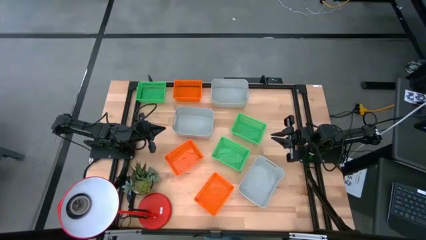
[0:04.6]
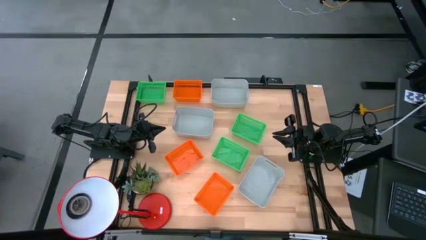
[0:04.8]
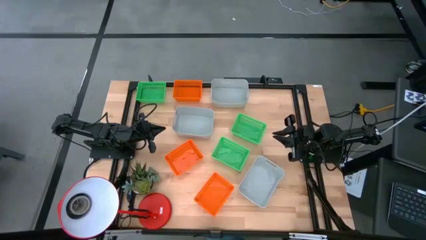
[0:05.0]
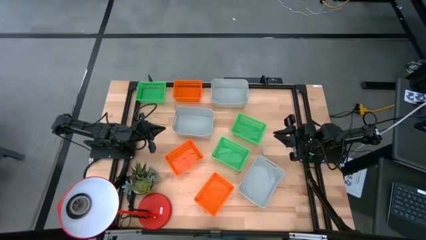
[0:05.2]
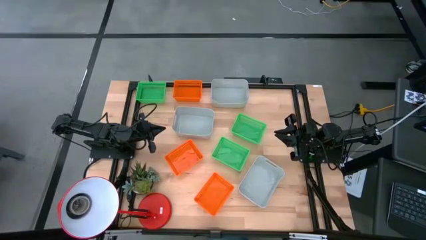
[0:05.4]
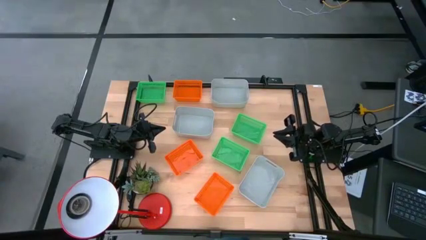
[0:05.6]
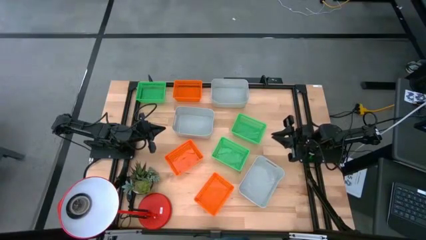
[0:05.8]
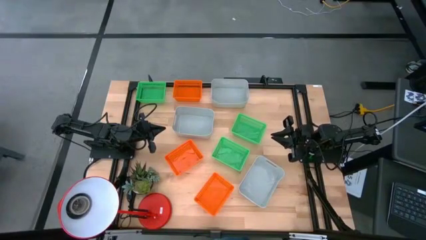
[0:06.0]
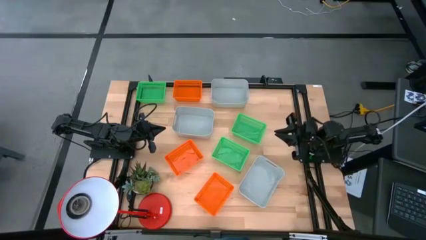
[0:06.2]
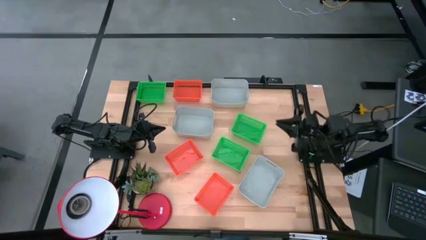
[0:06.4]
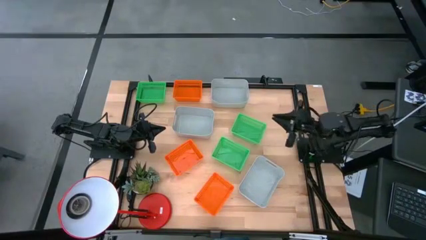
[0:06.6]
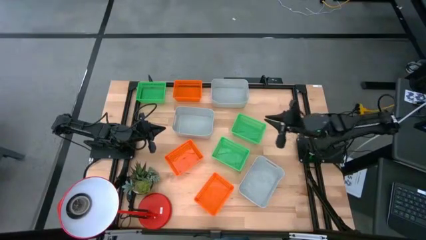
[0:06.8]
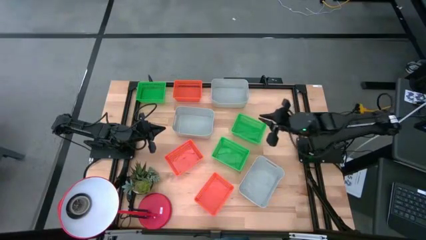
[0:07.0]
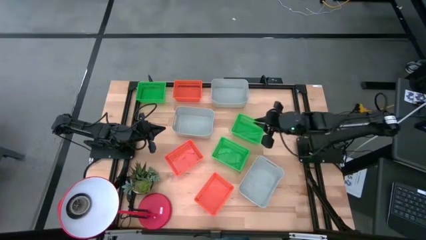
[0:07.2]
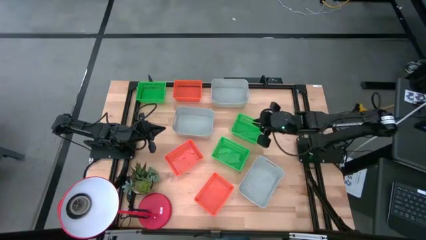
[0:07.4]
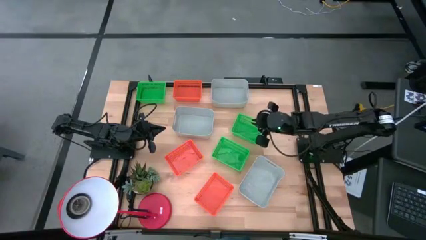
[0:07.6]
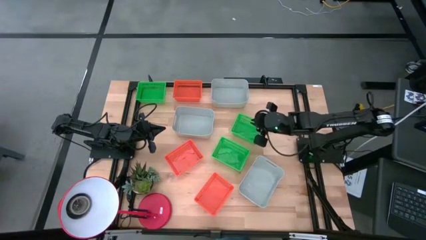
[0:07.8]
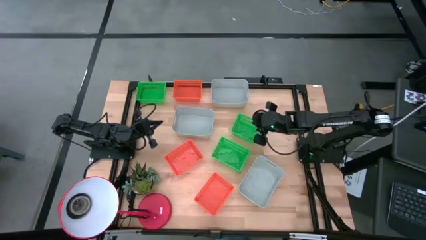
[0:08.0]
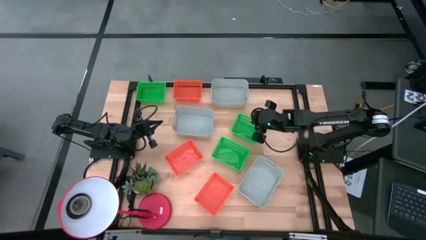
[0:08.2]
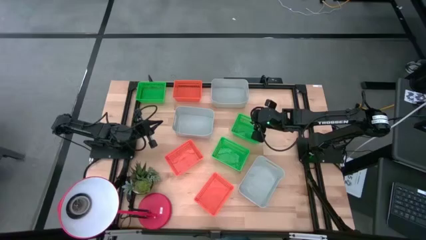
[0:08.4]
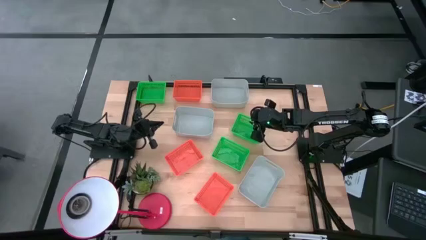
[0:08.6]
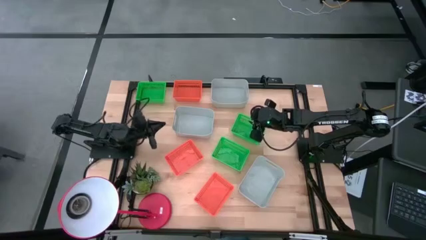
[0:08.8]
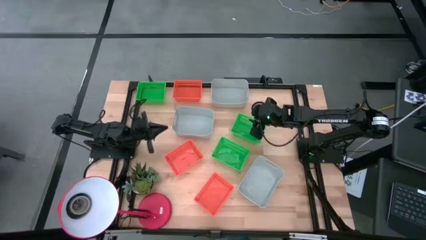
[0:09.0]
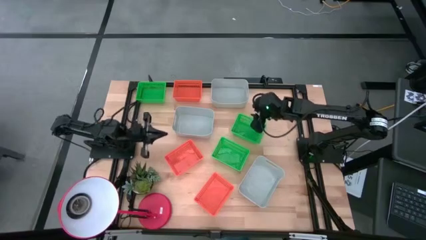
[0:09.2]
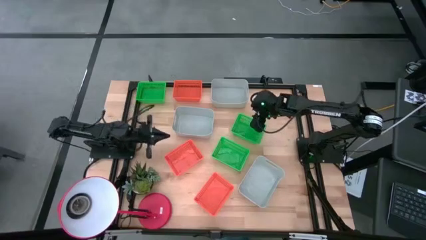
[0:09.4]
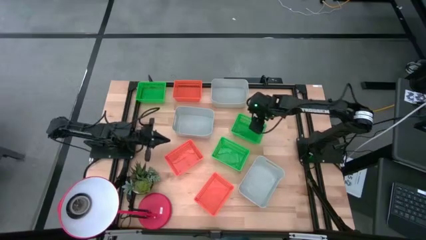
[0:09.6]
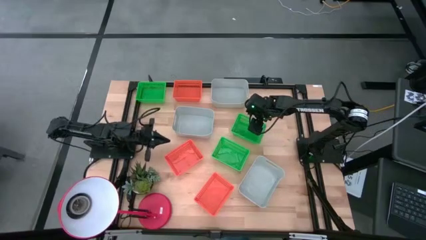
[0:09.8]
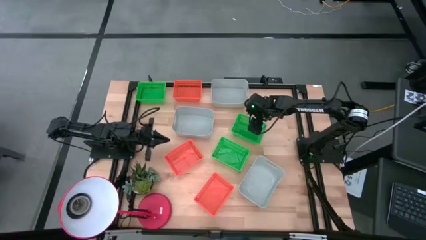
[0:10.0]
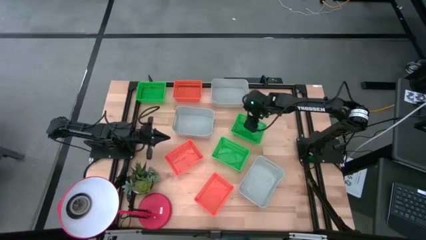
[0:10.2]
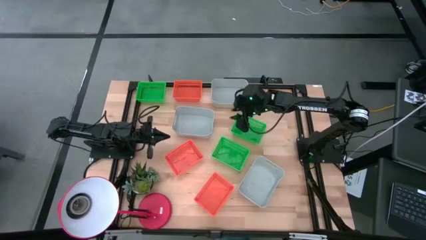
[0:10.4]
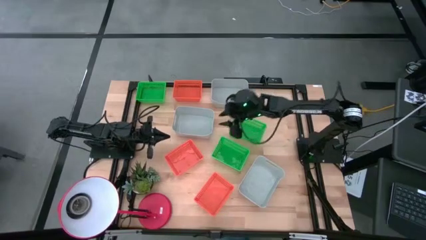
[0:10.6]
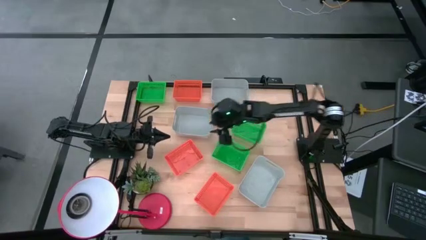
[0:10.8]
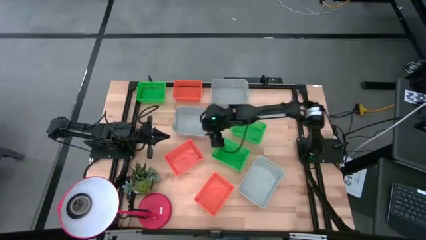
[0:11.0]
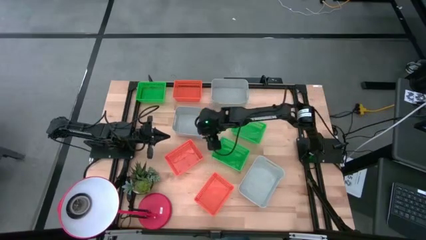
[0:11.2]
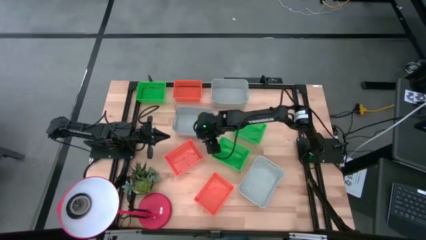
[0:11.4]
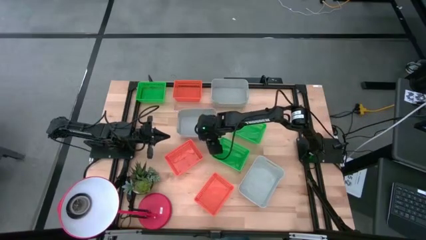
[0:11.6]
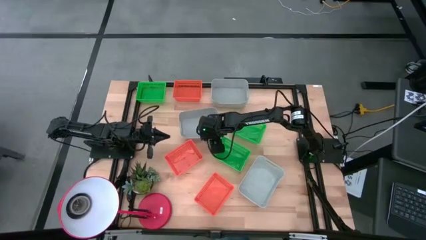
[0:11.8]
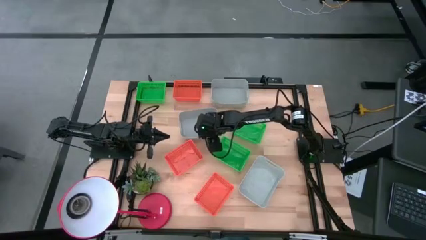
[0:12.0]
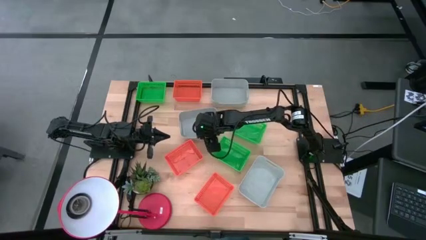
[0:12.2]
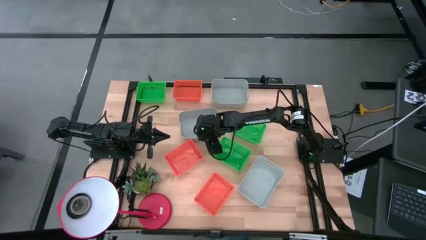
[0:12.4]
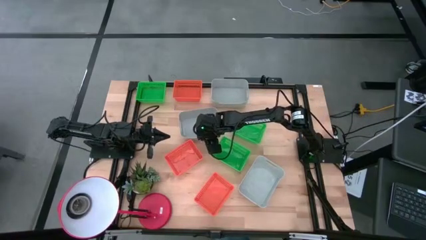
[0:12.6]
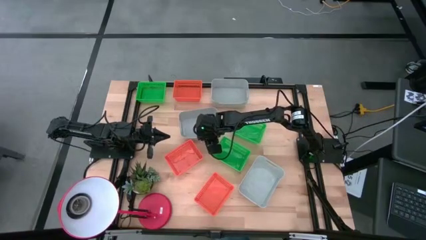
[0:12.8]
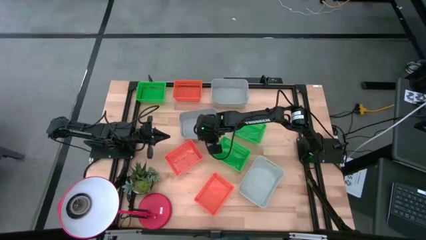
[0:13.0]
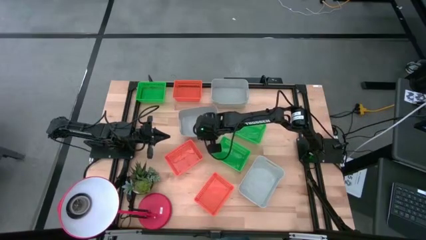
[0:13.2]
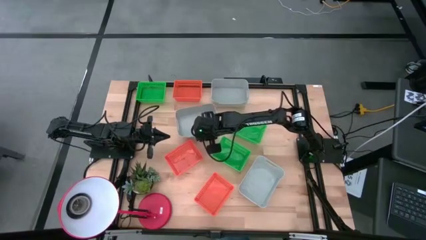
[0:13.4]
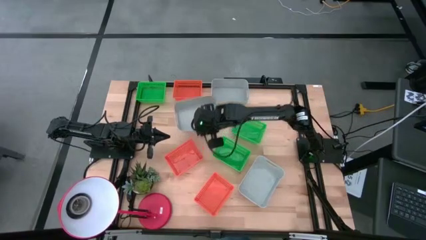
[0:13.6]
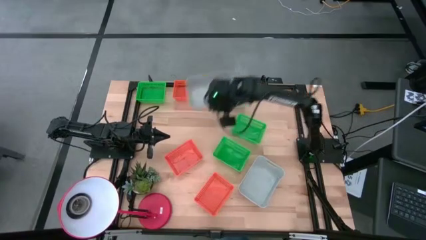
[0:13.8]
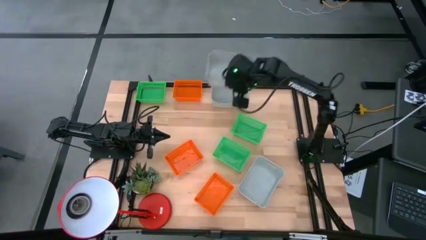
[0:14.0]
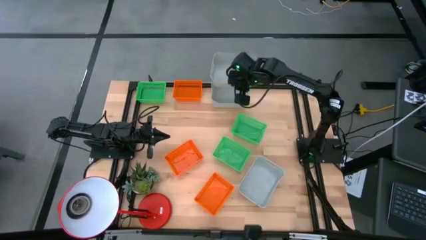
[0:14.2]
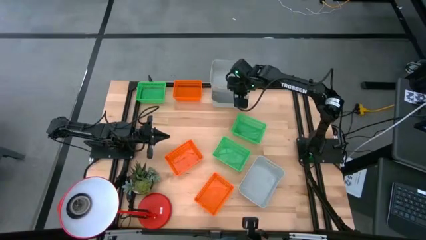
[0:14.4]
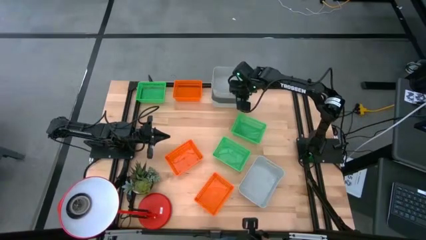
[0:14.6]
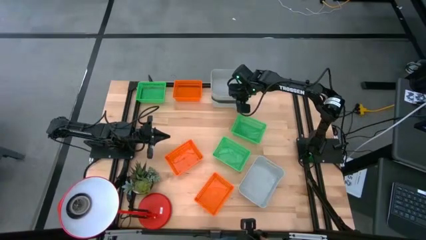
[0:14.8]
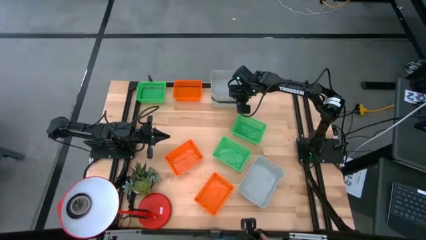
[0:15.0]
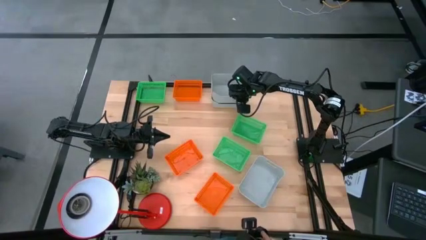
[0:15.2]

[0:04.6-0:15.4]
Stack the middle gray bin on the top gray bin
